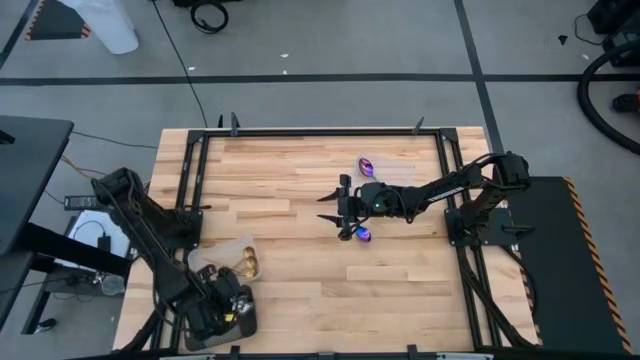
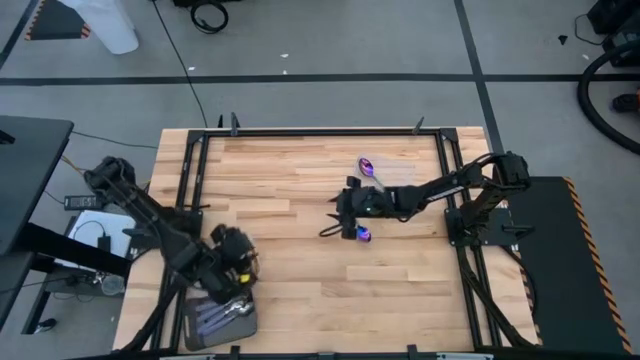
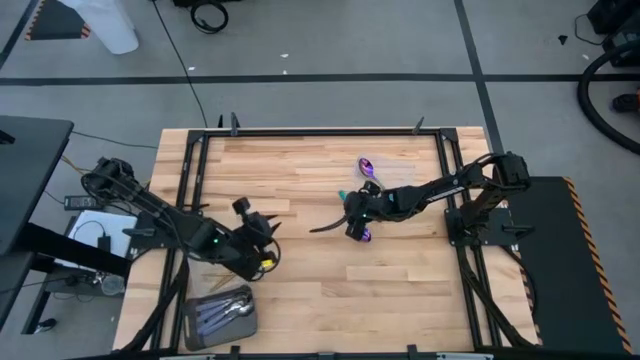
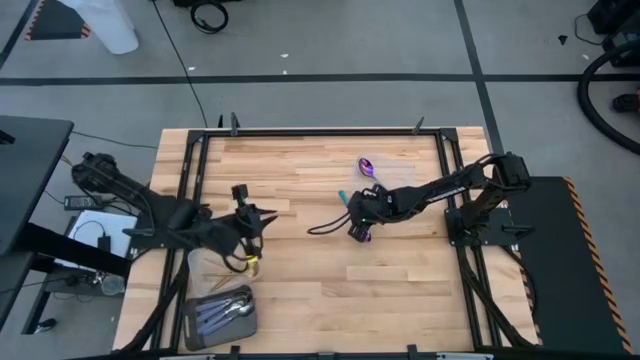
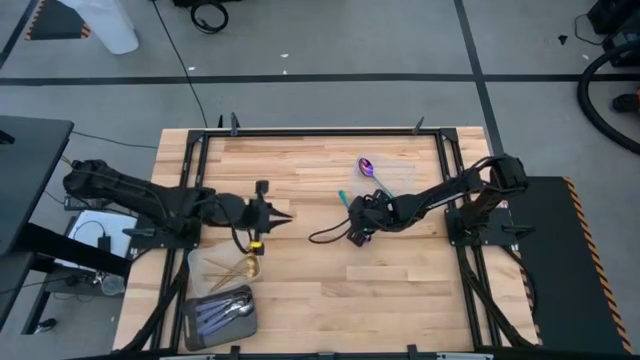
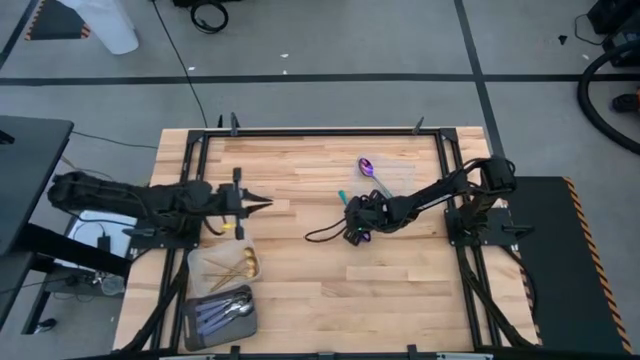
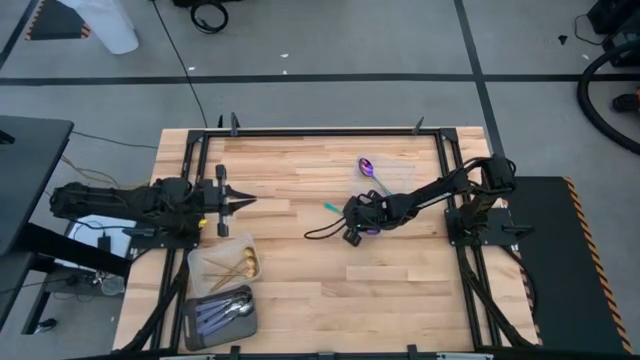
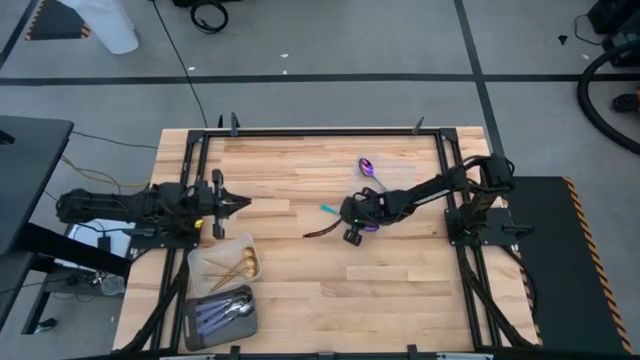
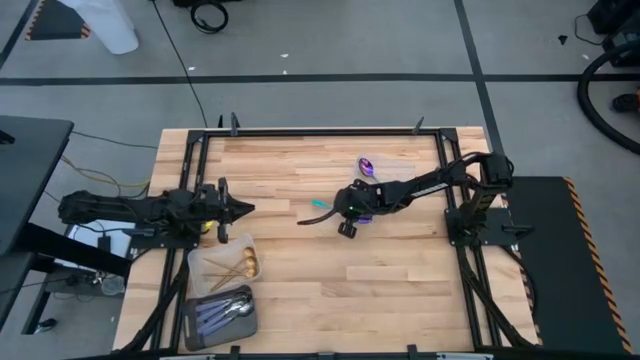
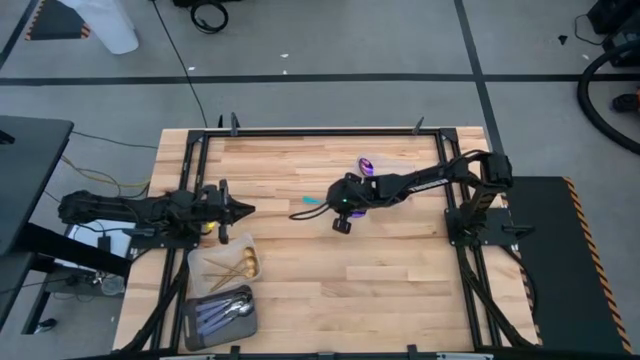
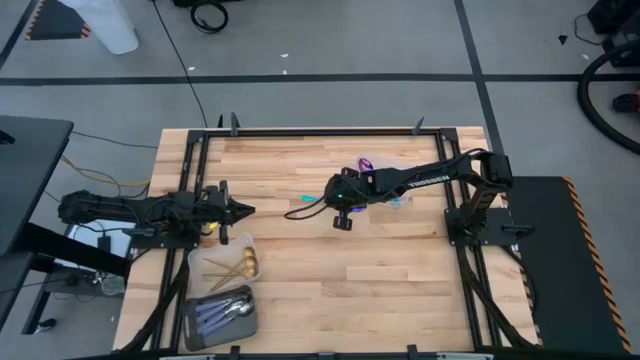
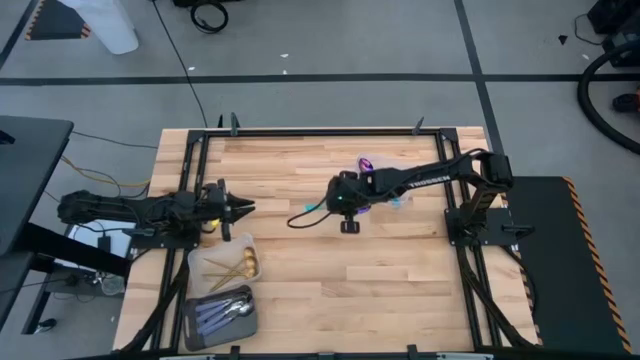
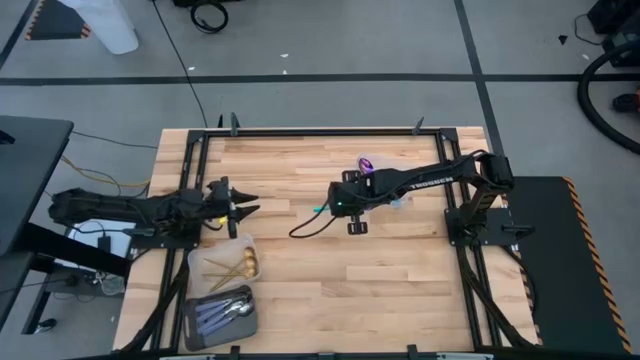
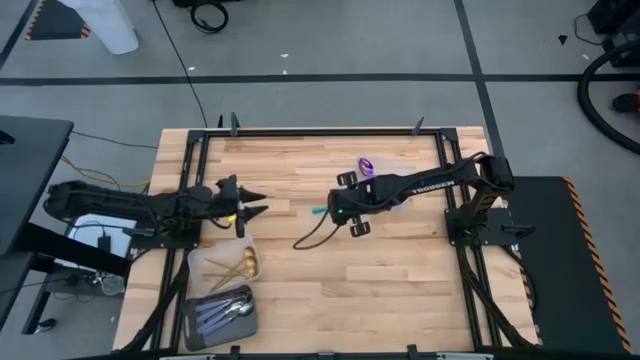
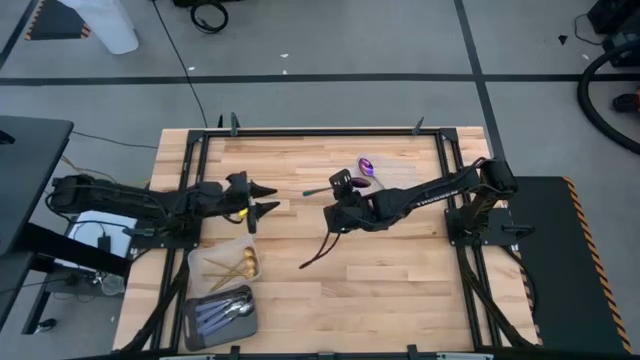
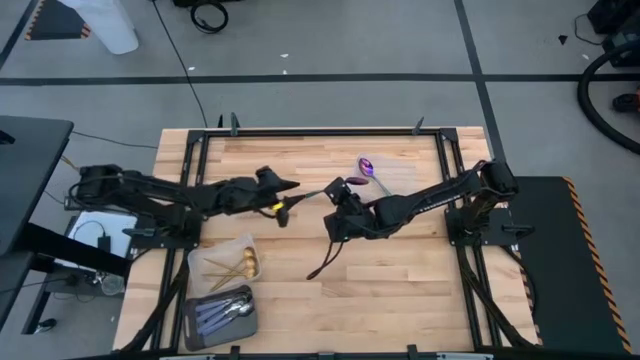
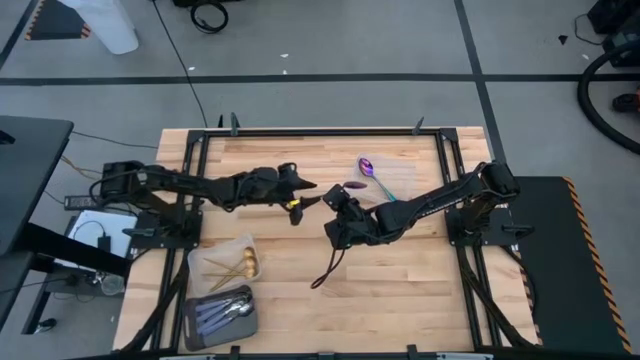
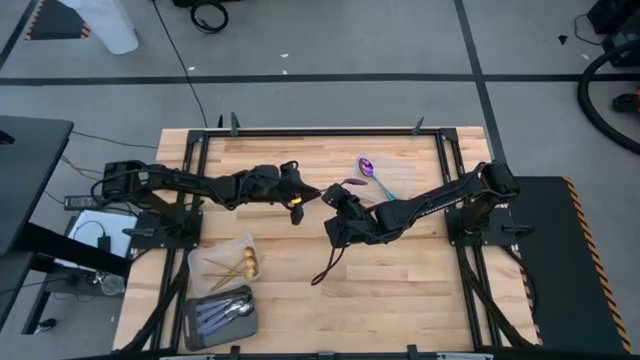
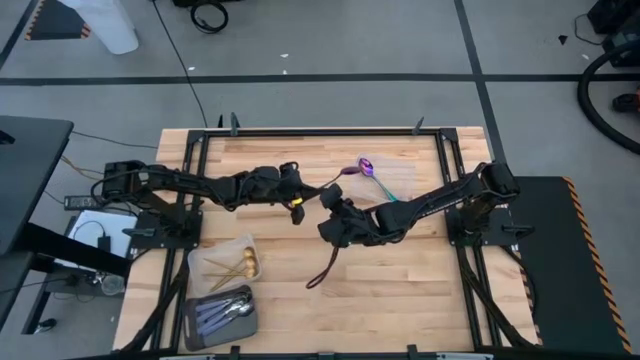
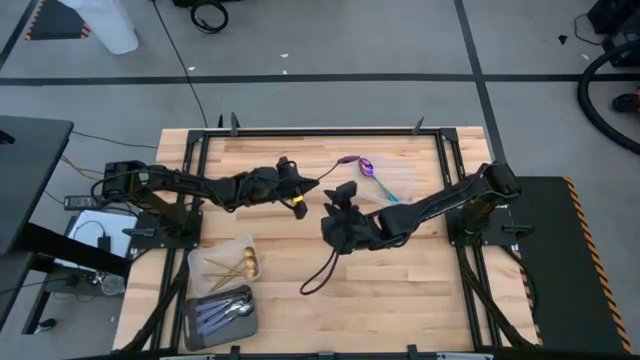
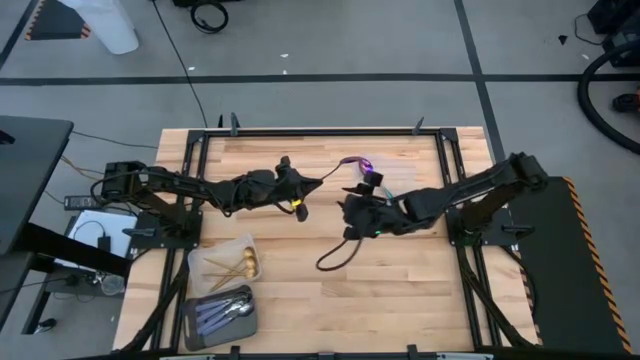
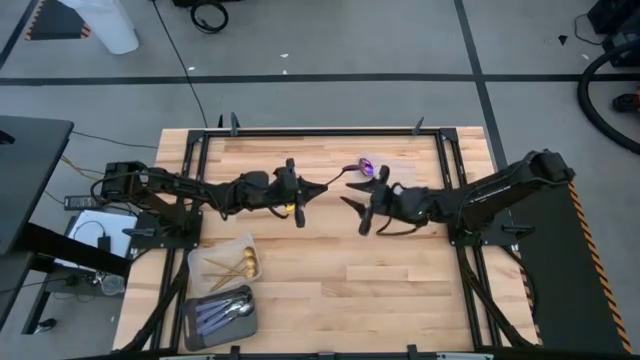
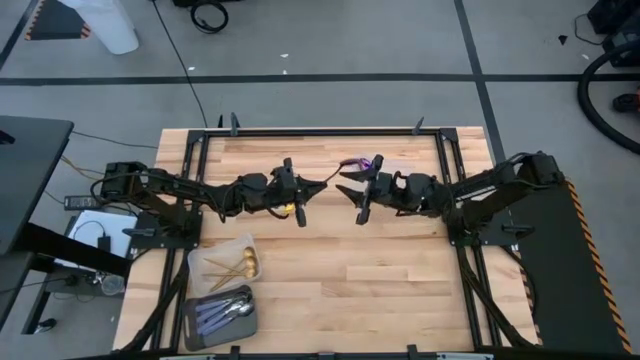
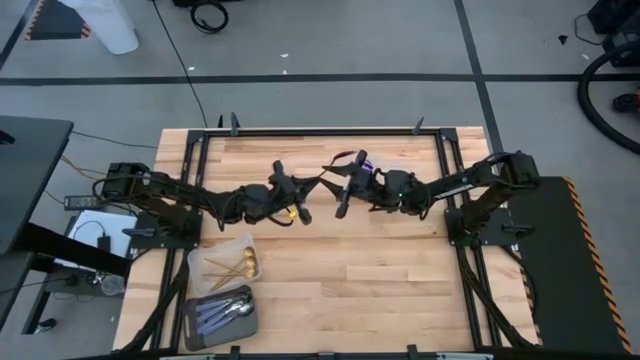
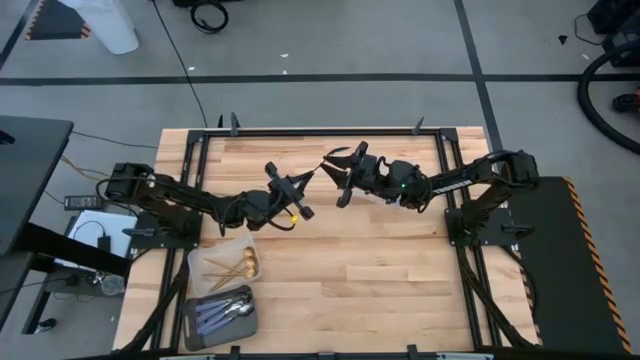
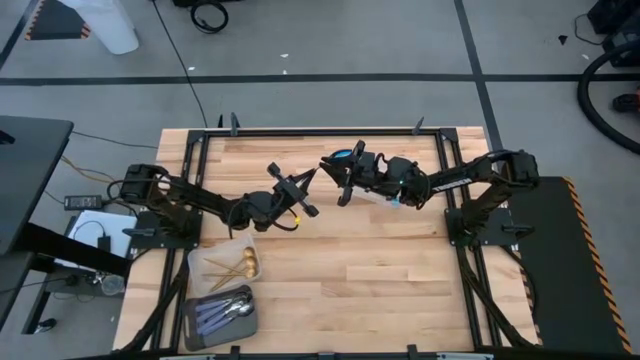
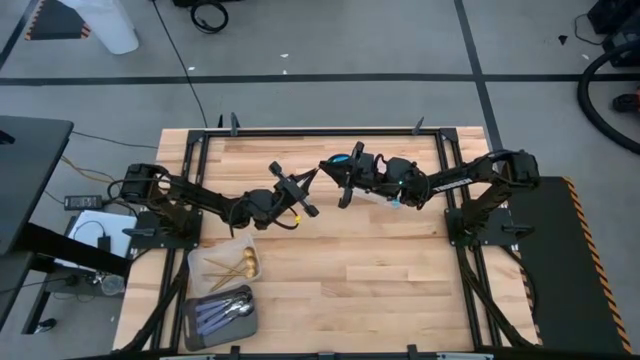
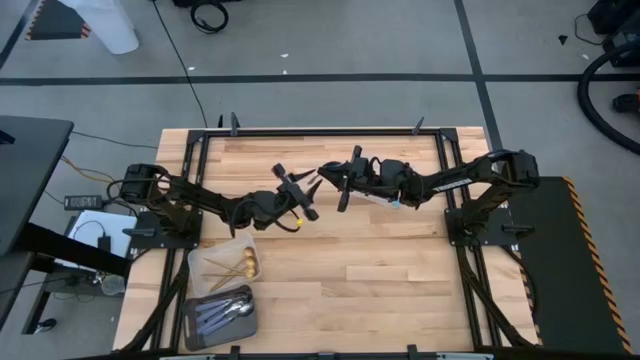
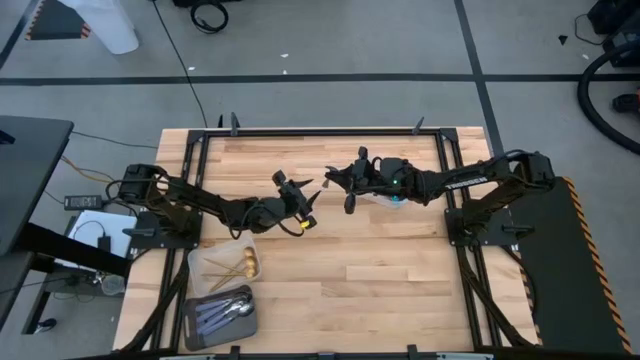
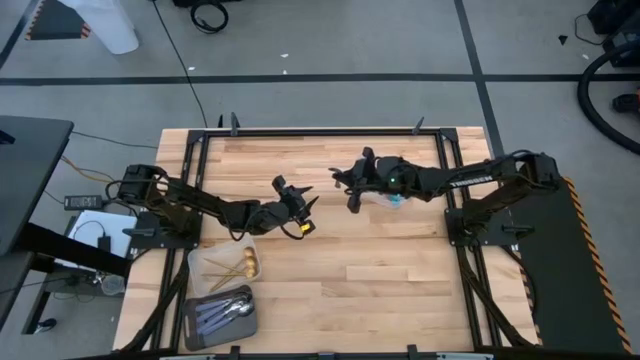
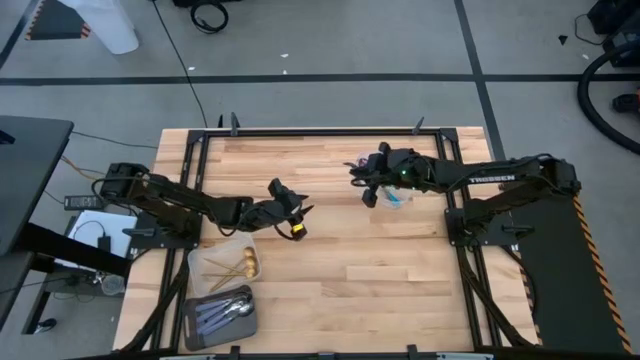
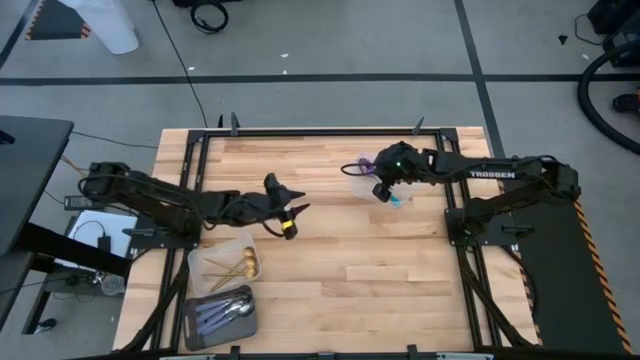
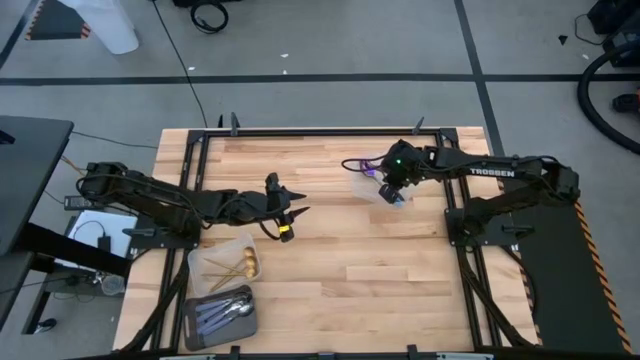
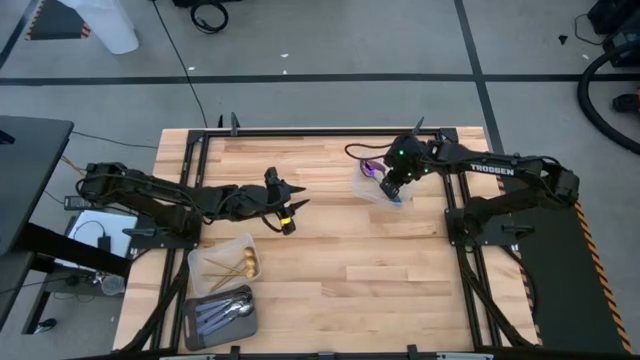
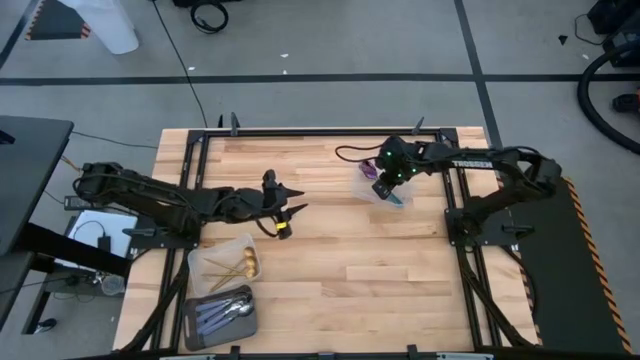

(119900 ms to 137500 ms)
Task: Sort silverware by color (type)
Put the blue spoon into the top transparent bin

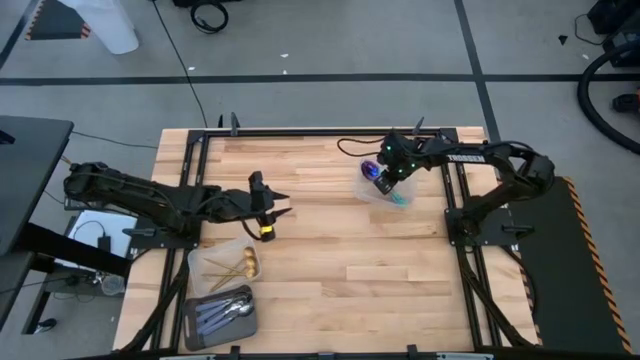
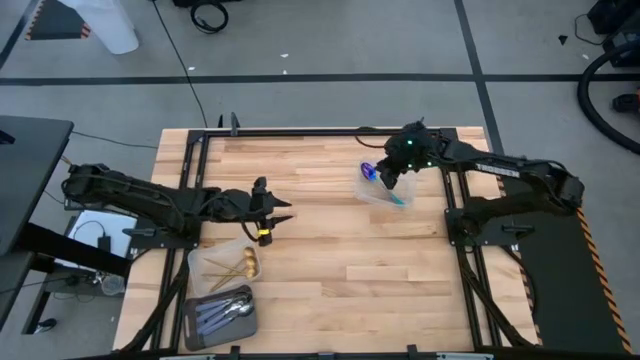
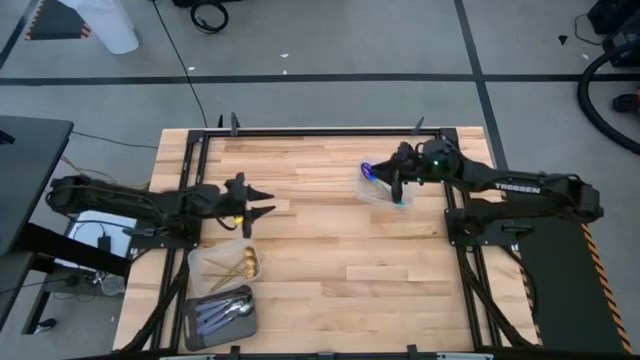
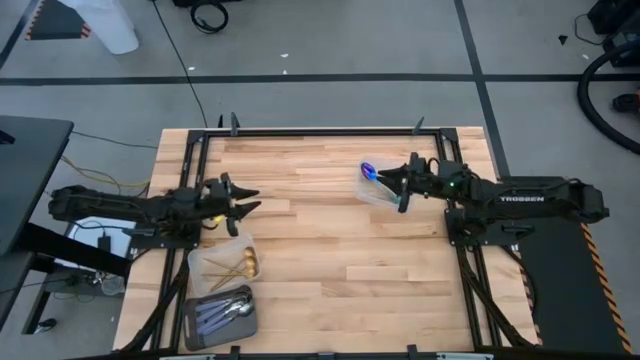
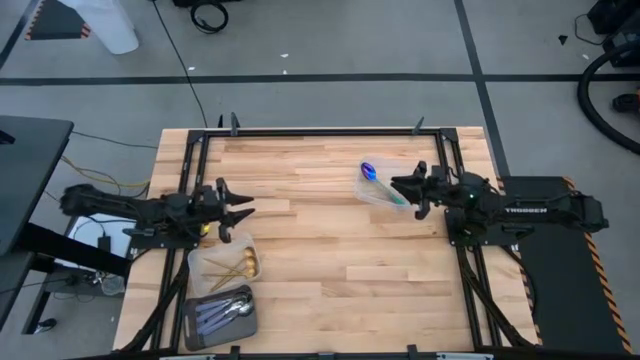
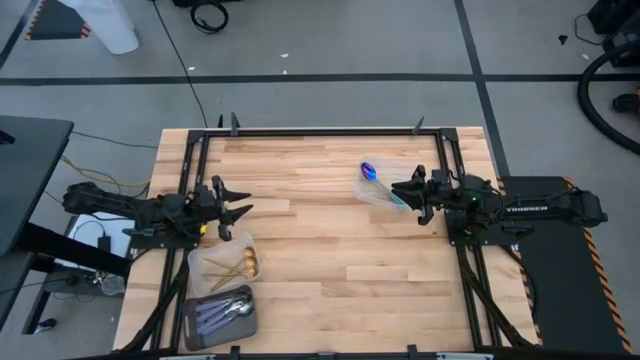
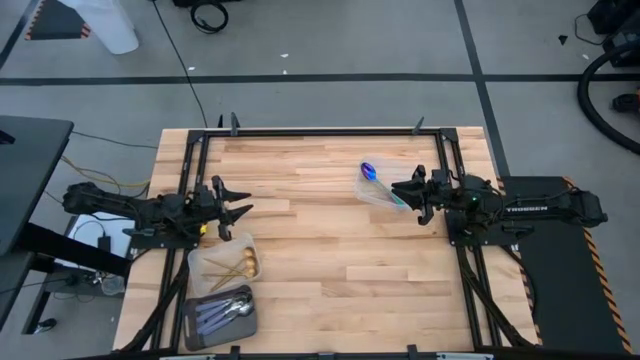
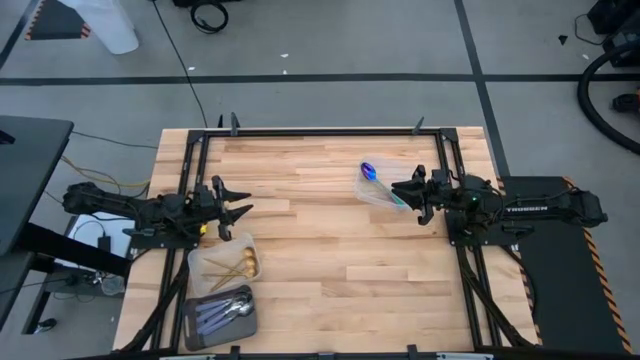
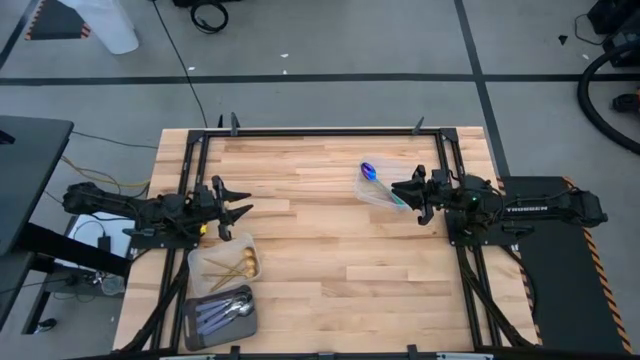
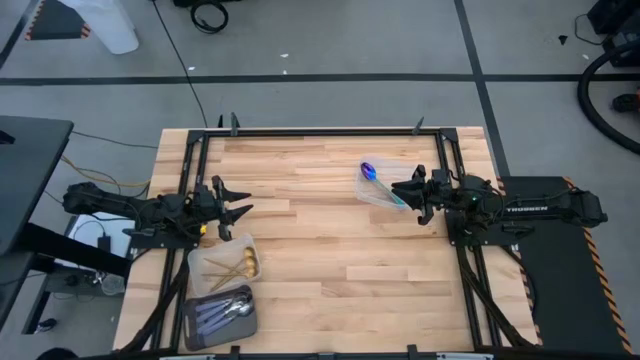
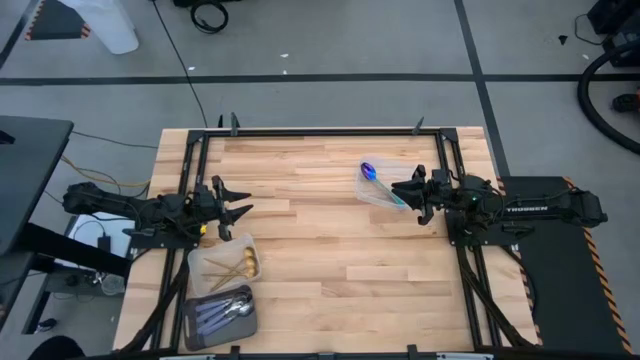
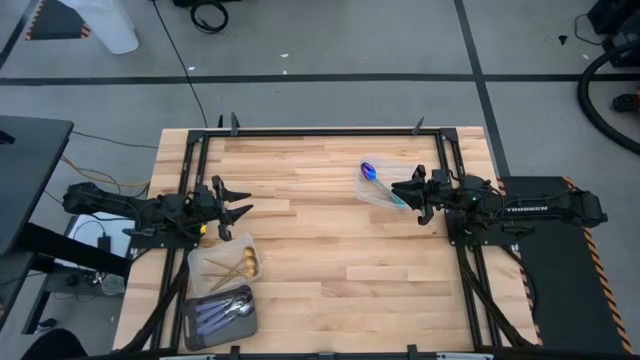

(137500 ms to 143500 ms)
Return to Home Position
